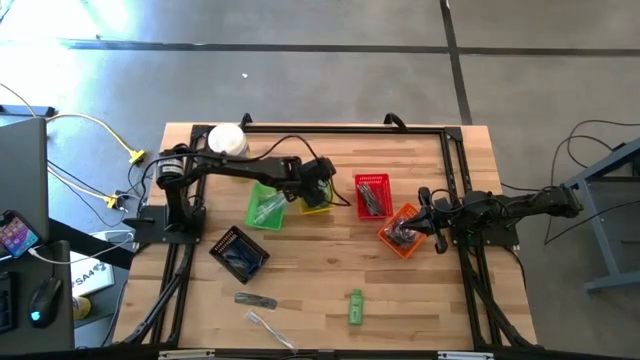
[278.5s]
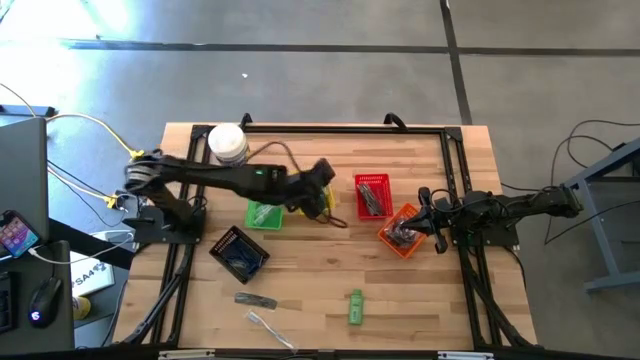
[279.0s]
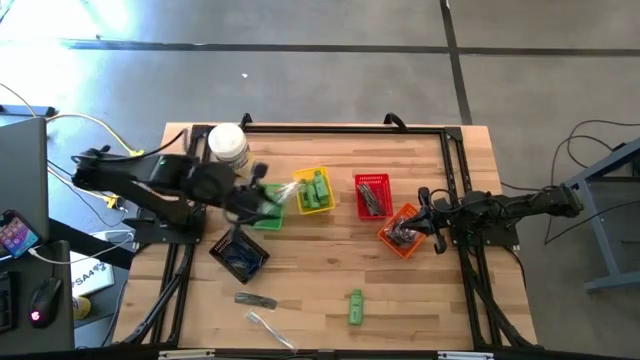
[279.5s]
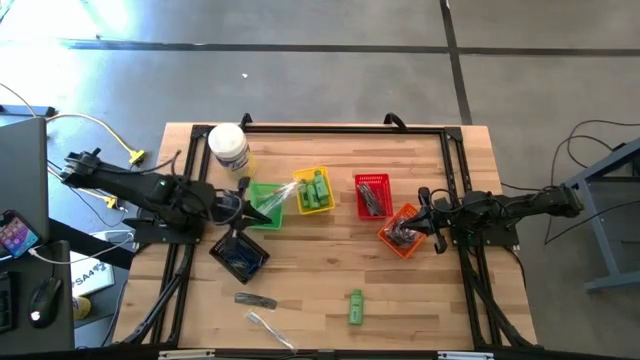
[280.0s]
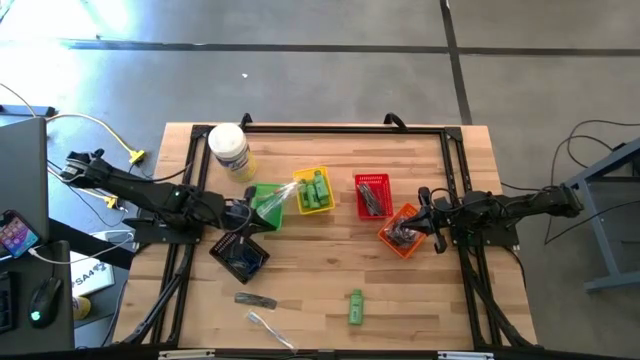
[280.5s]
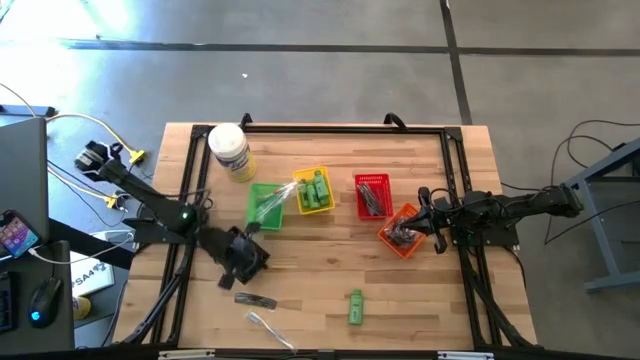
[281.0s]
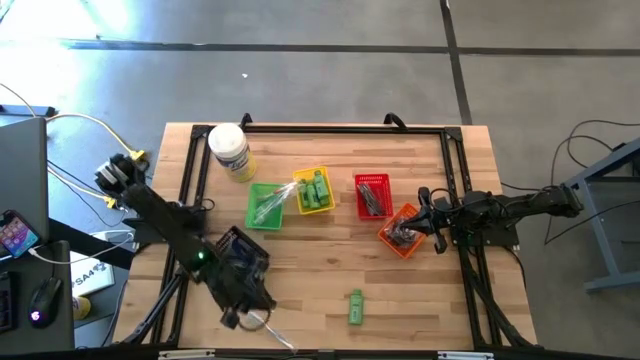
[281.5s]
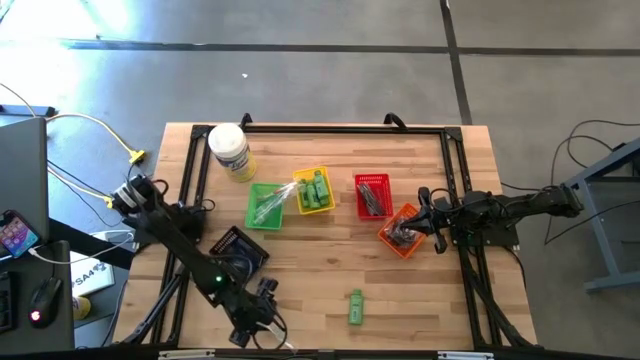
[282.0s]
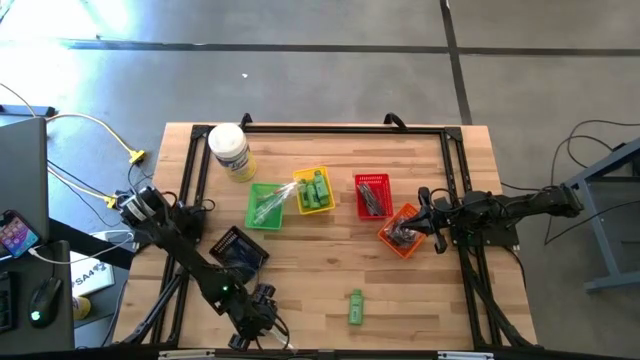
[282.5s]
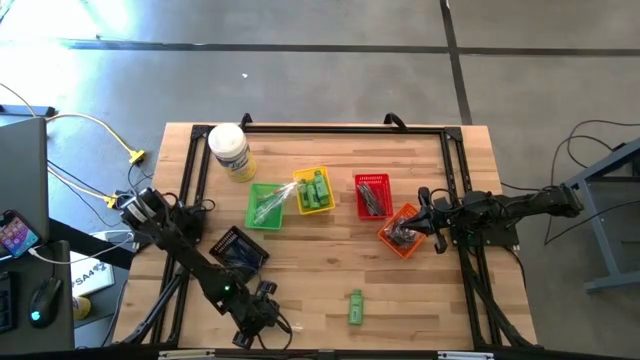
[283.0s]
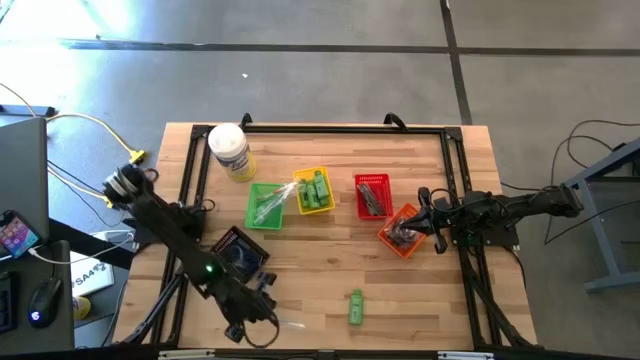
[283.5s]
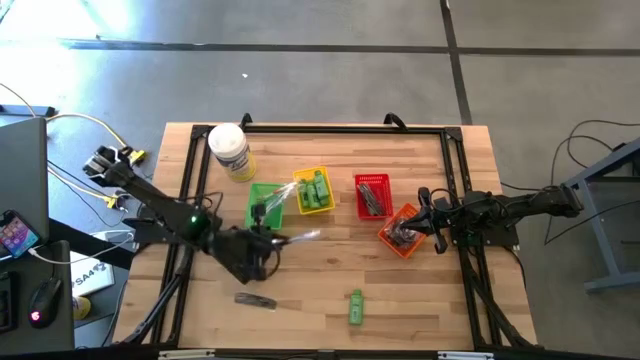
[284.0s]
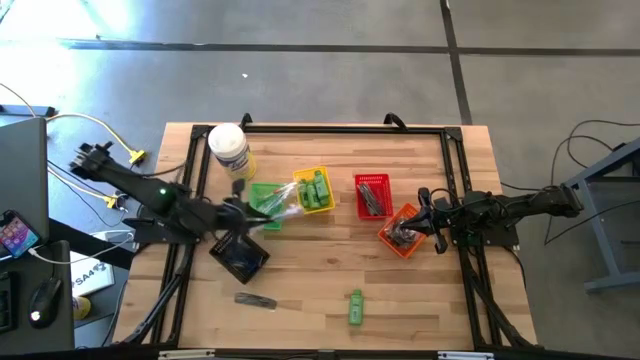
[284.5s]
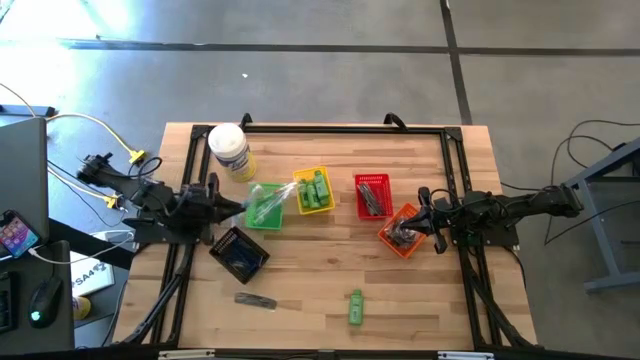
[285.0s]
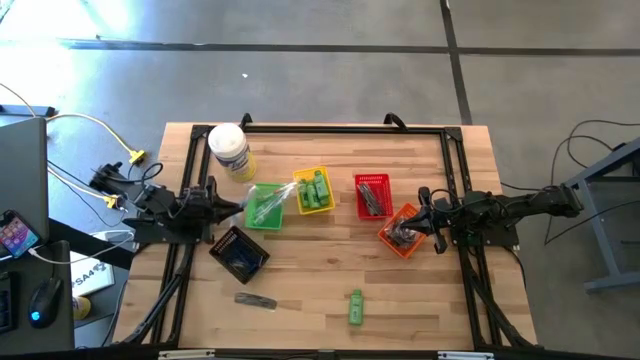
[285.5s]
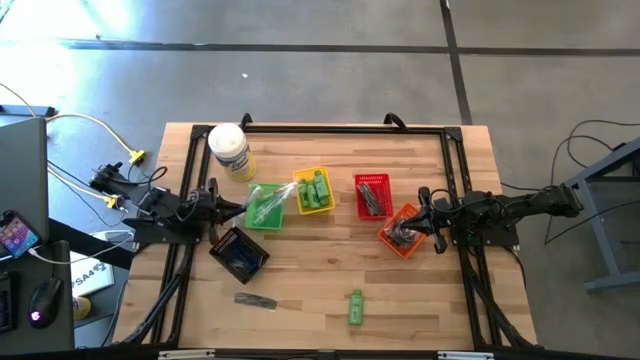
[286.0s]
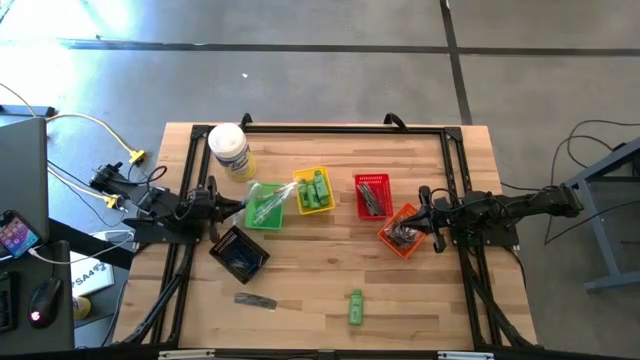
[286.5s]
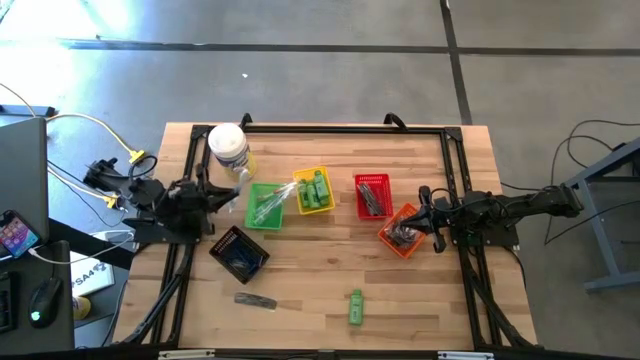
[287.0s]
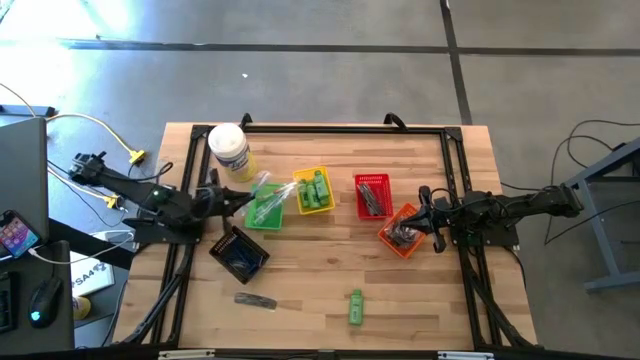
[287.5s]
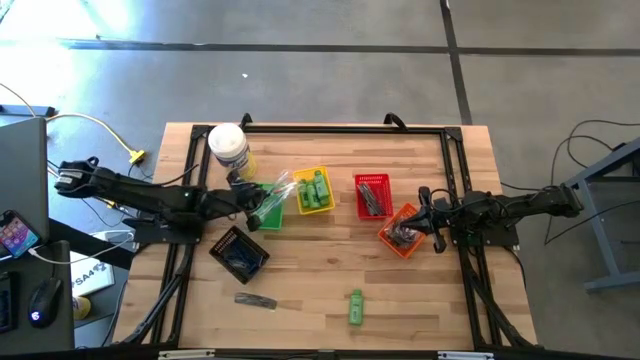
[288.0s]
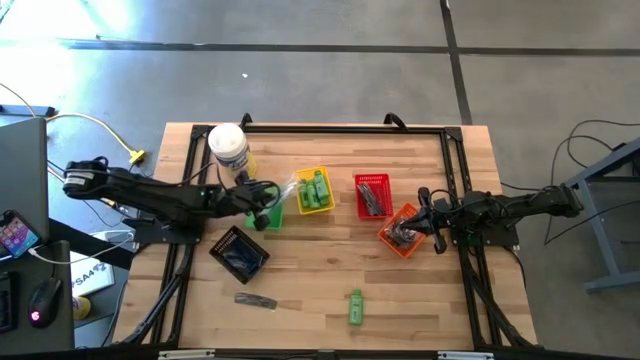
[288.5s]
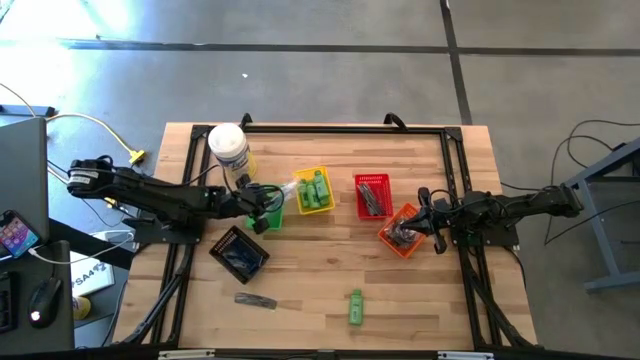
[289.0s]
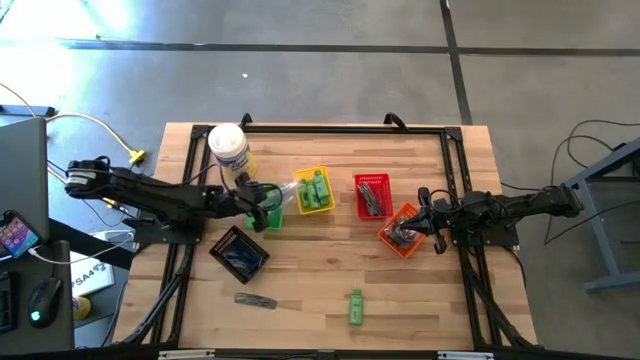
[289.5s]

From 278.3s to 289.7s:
Task: Pick & Place Travel size toiletries
Put the blue toothbrush into green basket

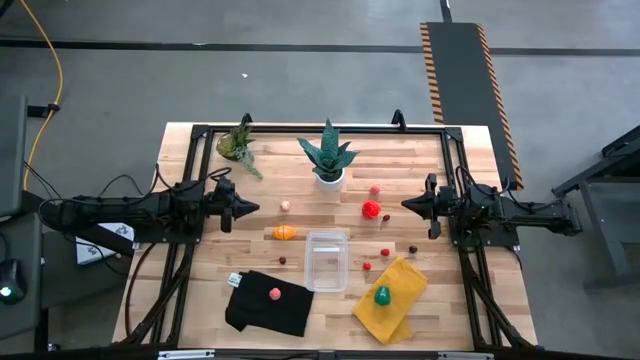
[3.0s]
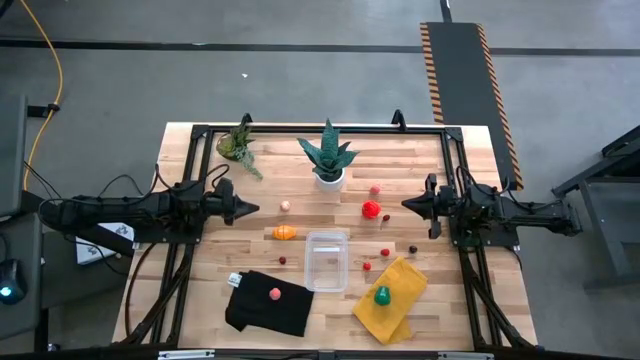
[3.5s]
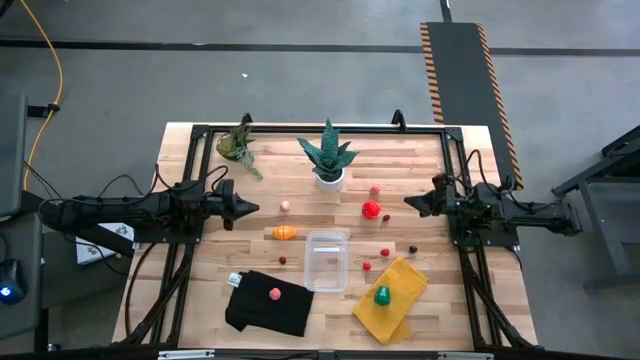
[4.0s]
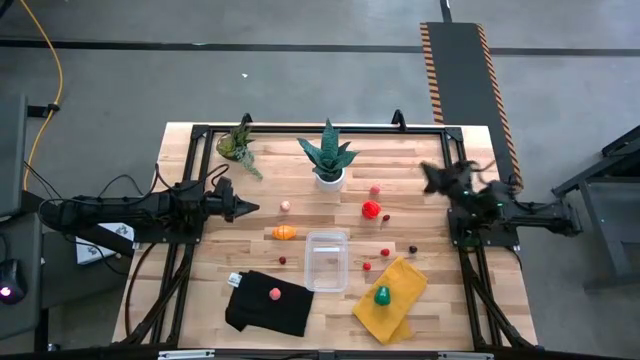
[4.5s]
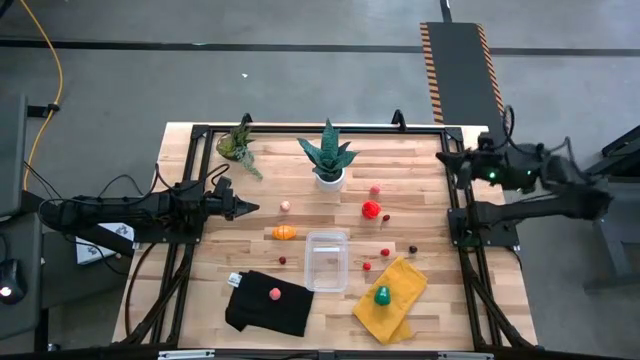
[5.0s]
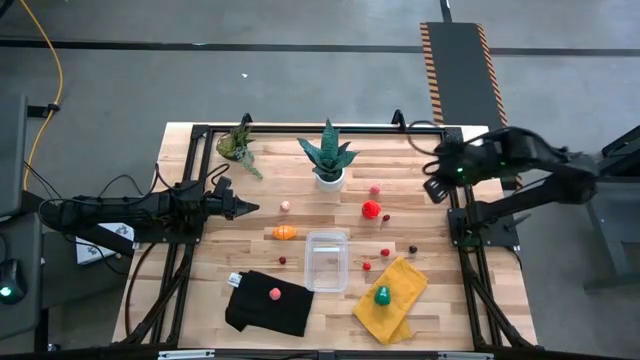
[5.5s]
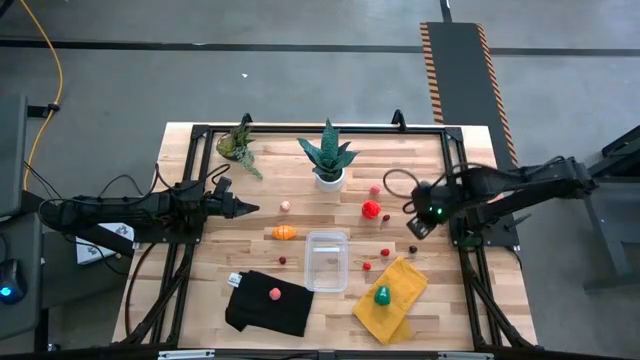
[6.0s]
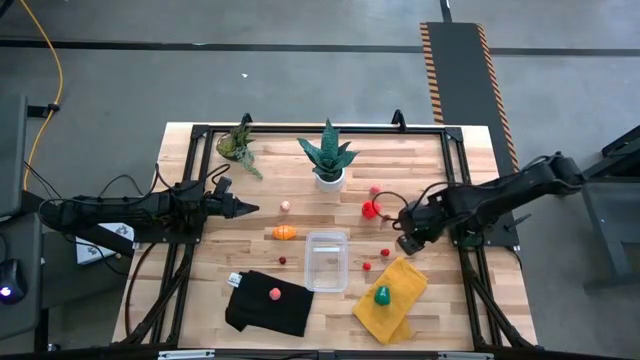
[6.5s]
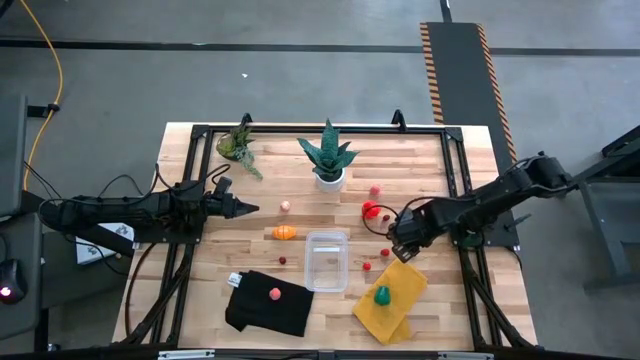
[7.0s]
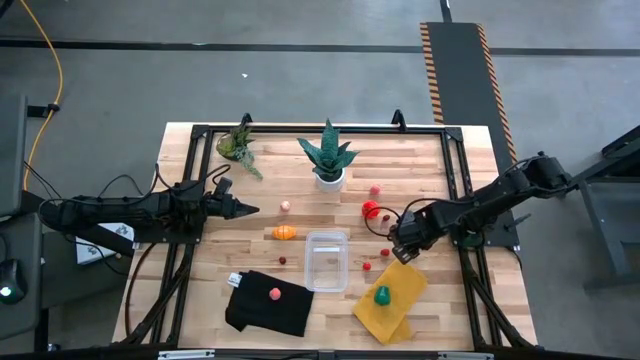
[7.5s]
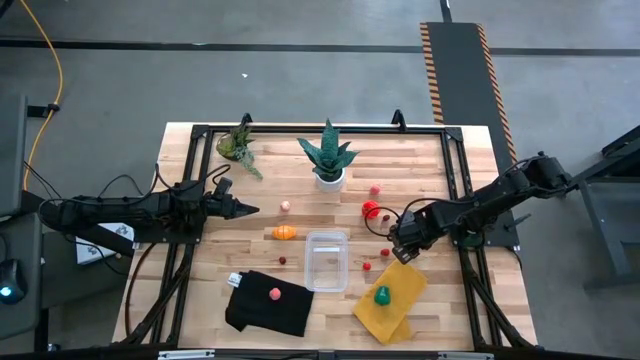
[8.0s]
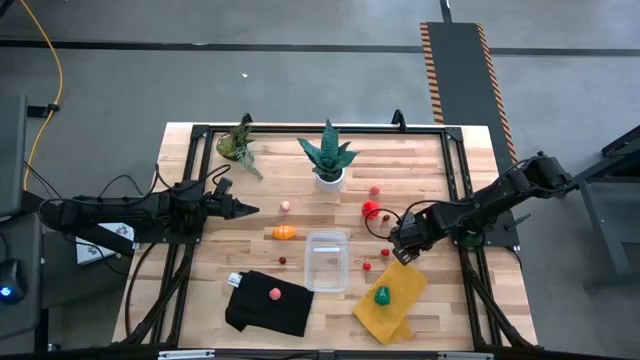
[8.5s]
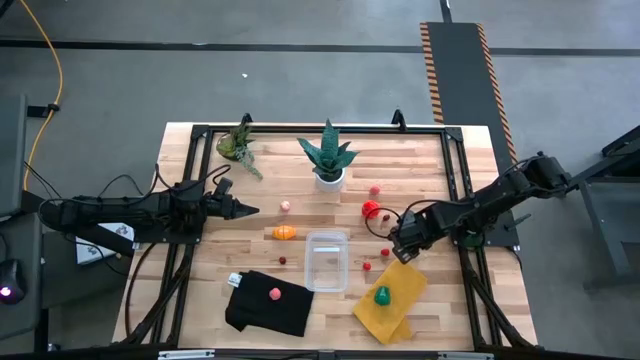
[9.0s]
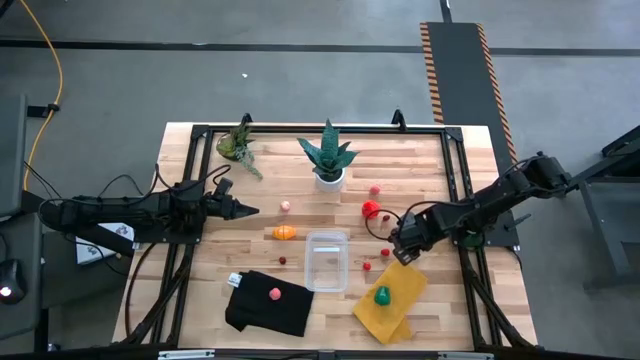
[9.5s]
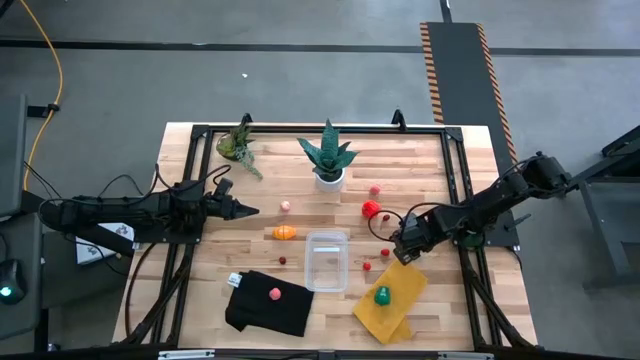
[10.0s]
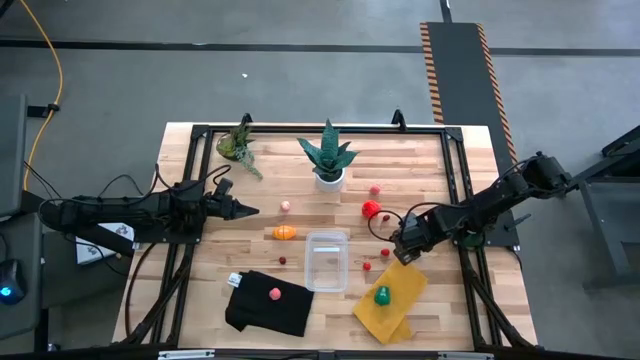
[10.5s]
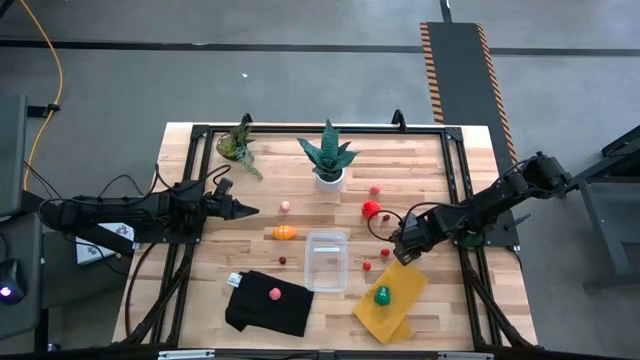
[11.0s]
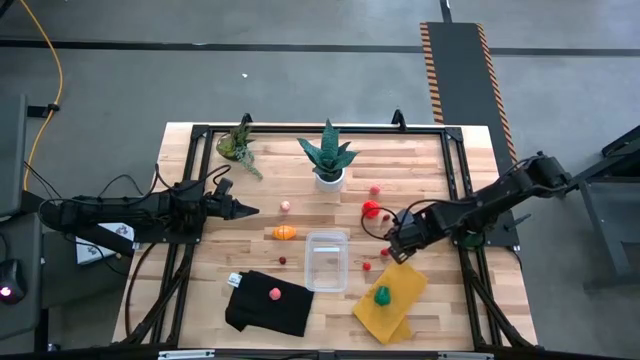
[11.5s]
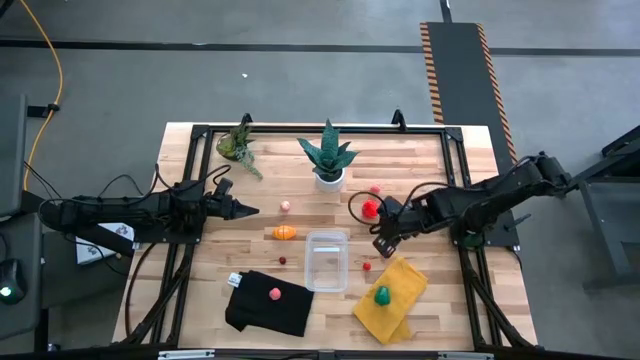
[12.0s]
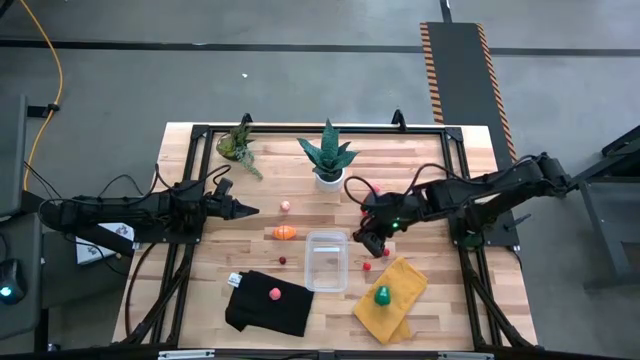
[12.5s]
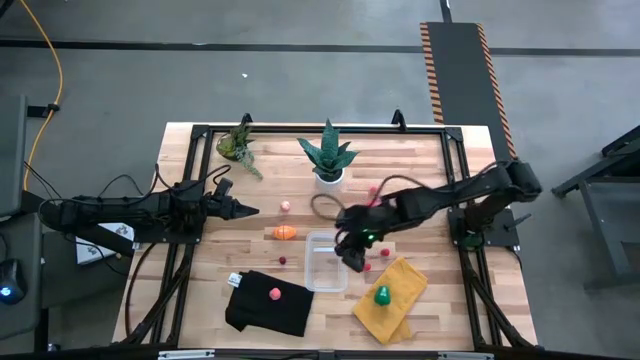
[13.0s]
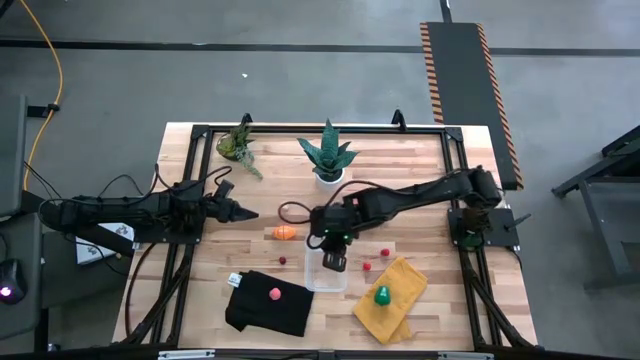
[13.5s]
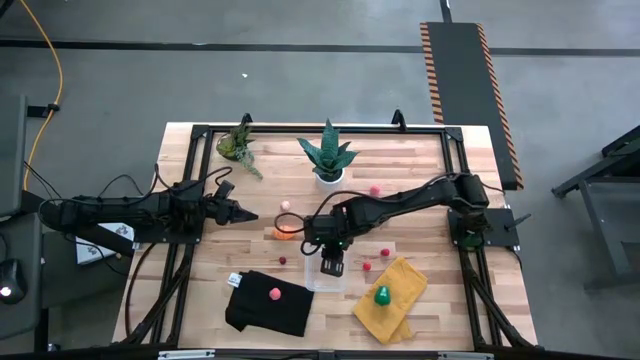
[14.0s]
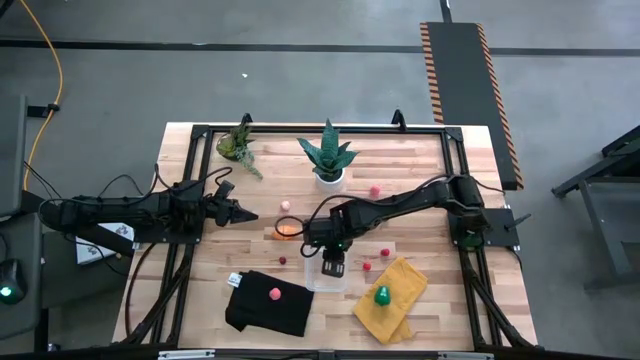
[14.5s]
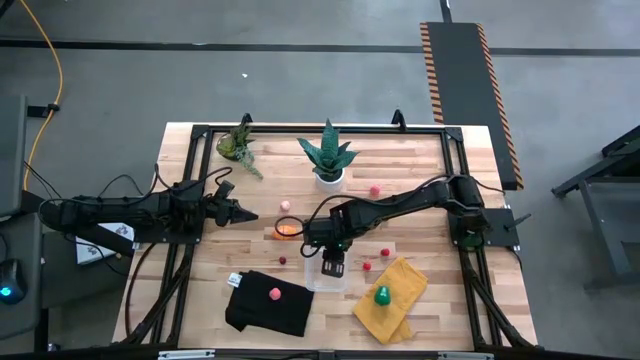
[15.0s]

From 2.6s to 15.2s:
Task: Pick and placing Produce into tupperware
Put the black cherry into the transparent container
